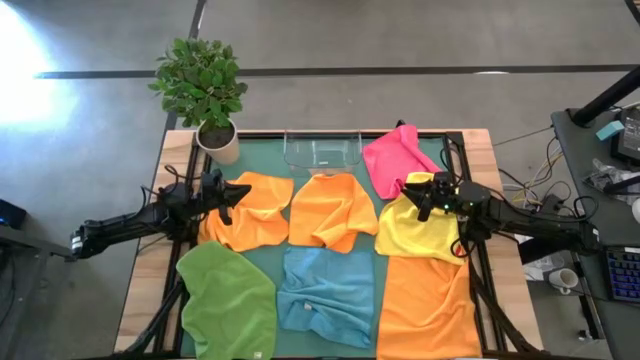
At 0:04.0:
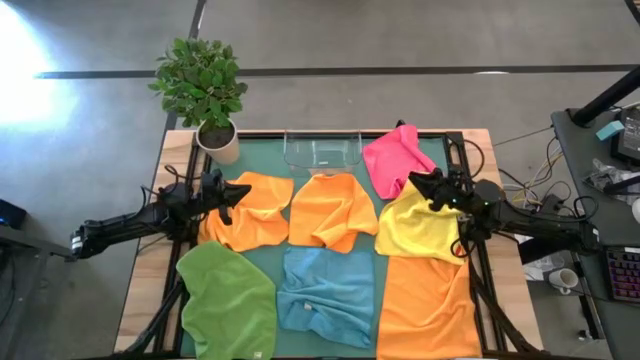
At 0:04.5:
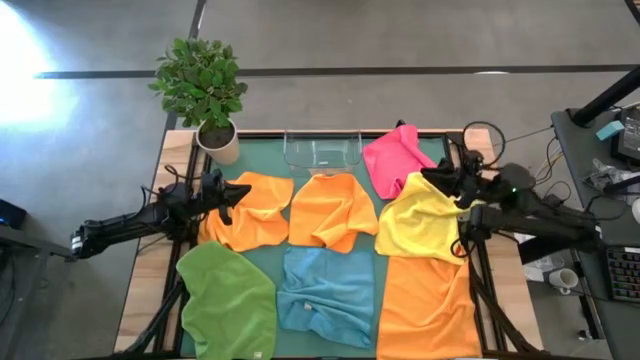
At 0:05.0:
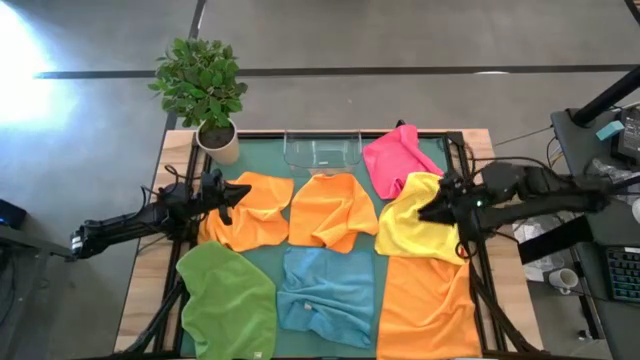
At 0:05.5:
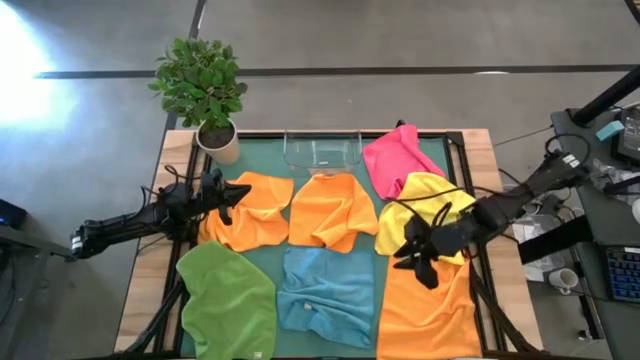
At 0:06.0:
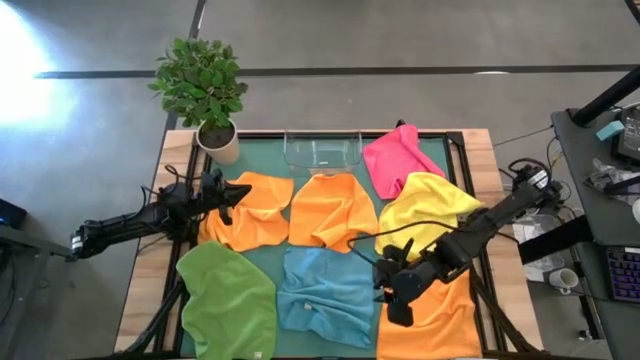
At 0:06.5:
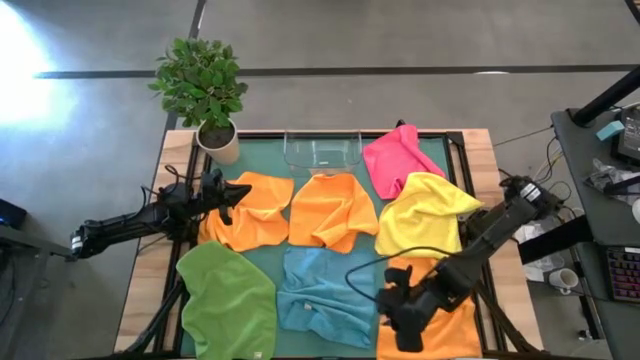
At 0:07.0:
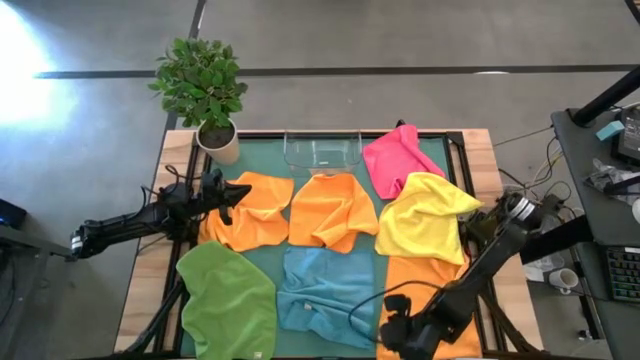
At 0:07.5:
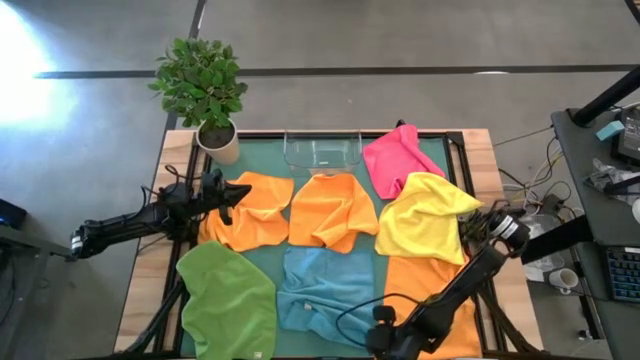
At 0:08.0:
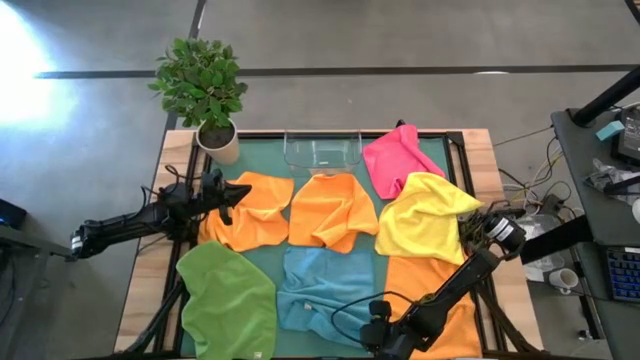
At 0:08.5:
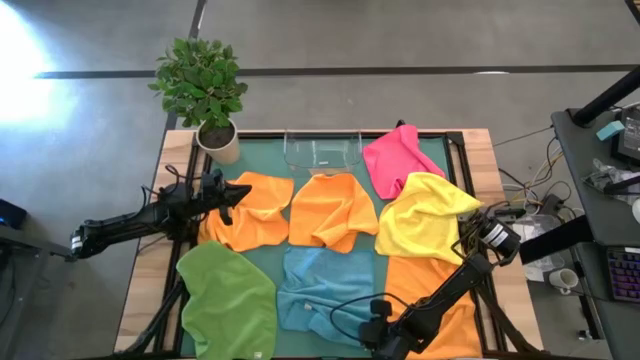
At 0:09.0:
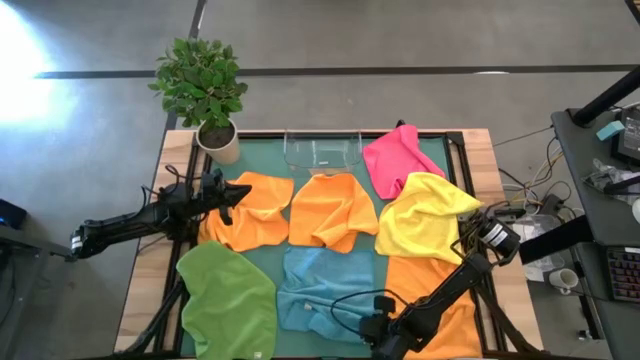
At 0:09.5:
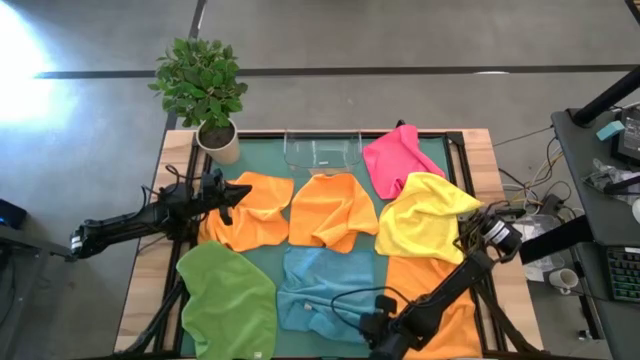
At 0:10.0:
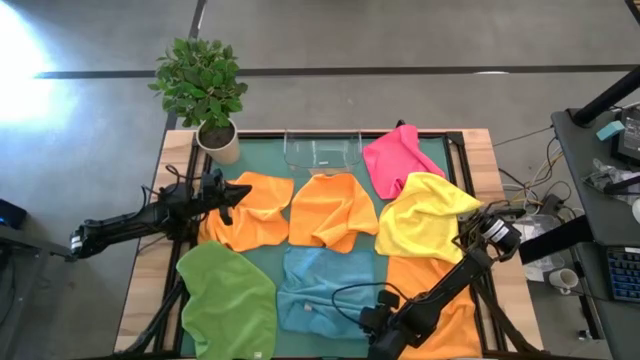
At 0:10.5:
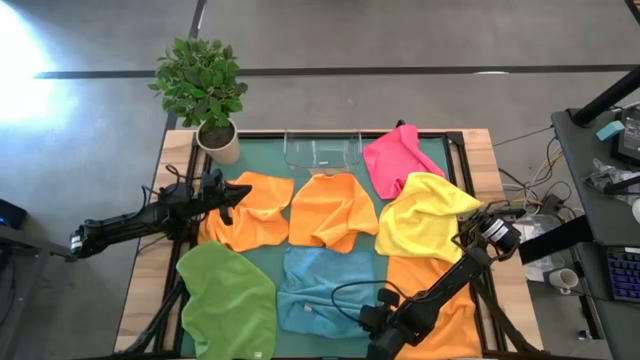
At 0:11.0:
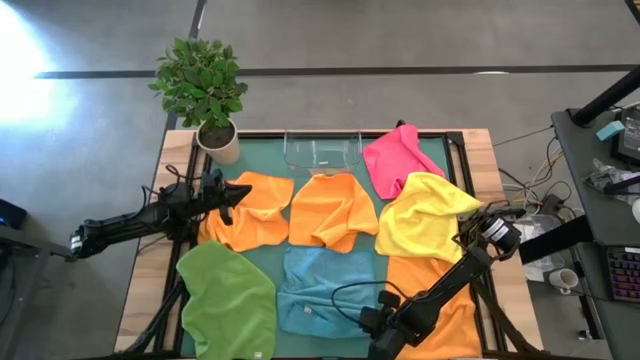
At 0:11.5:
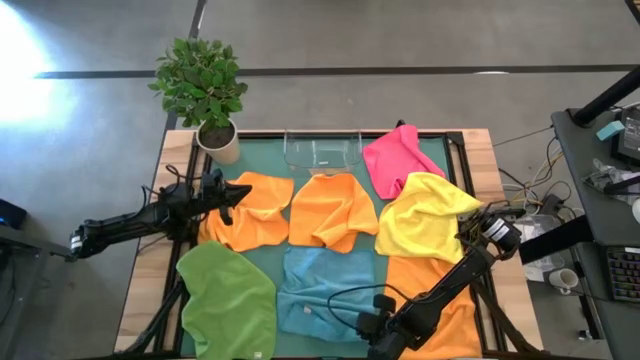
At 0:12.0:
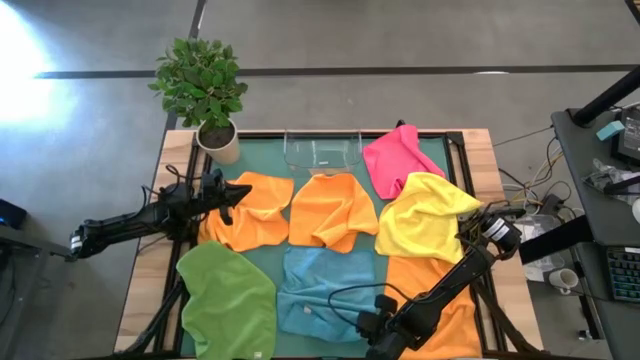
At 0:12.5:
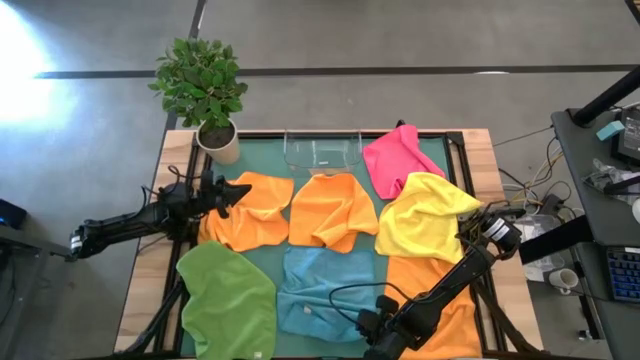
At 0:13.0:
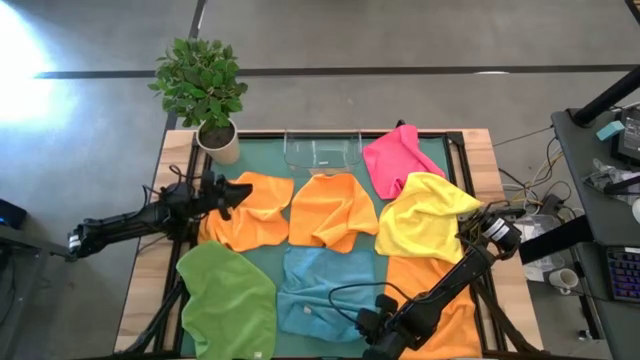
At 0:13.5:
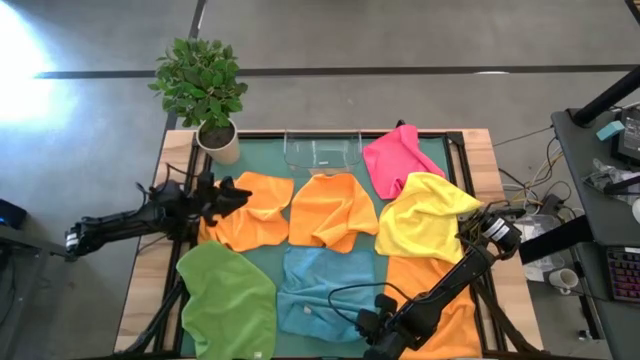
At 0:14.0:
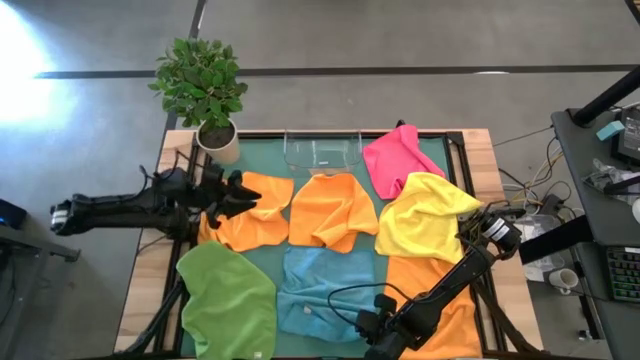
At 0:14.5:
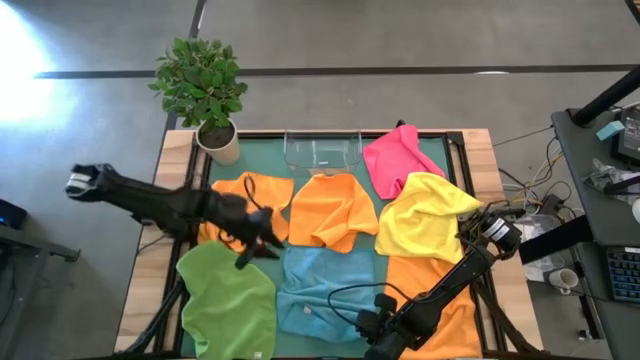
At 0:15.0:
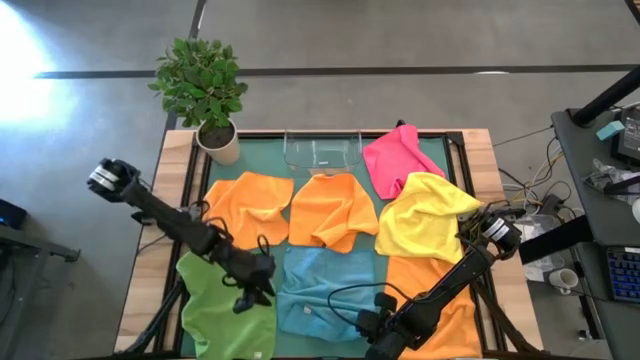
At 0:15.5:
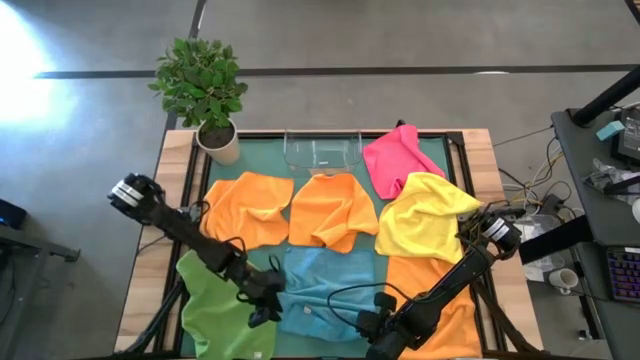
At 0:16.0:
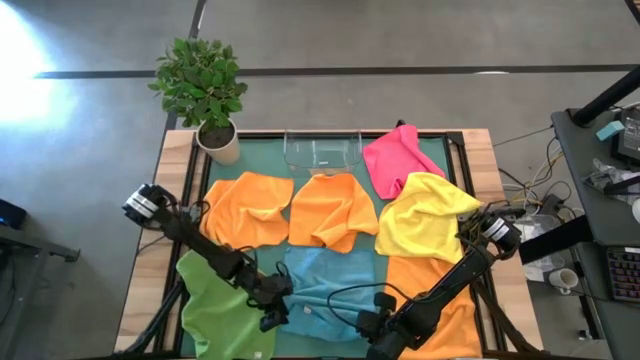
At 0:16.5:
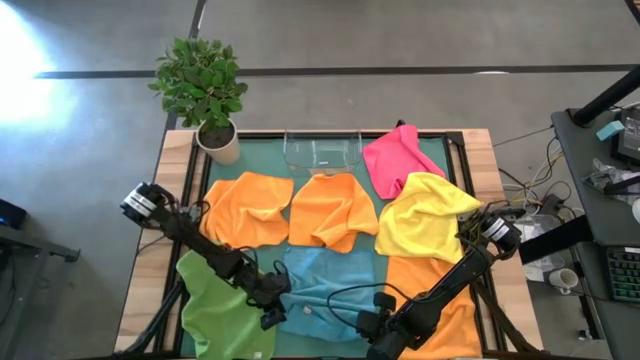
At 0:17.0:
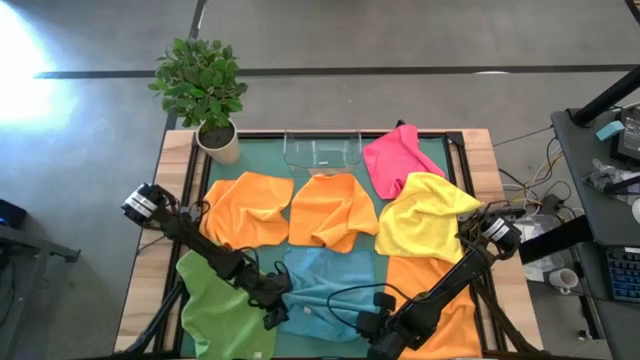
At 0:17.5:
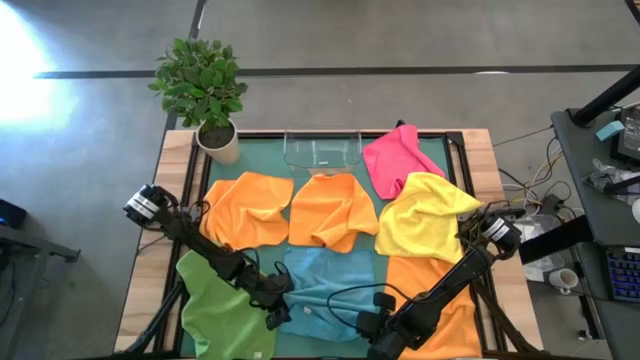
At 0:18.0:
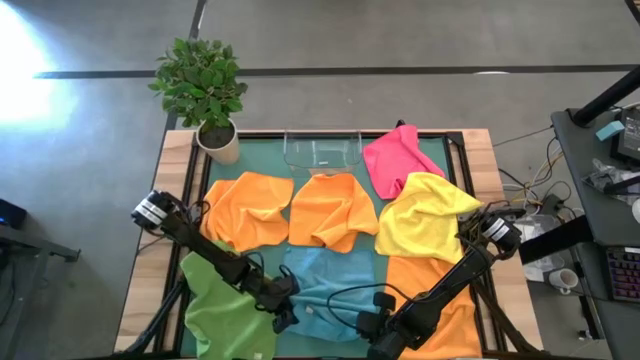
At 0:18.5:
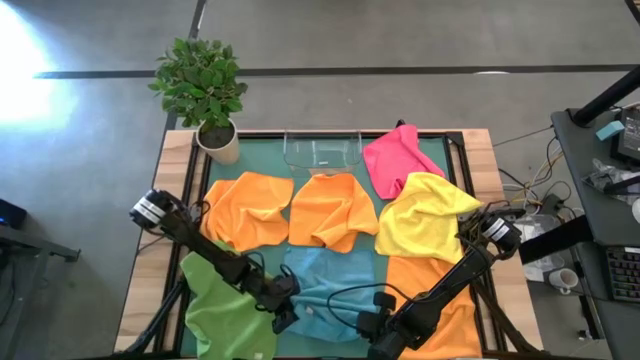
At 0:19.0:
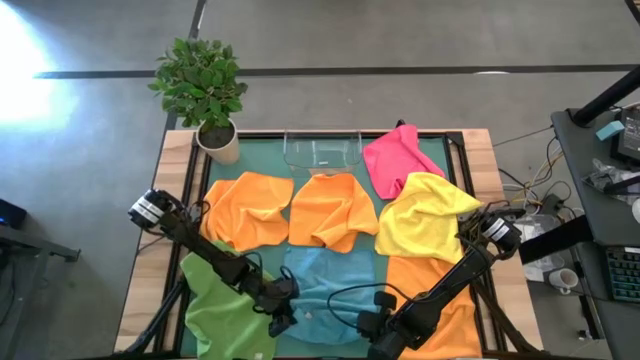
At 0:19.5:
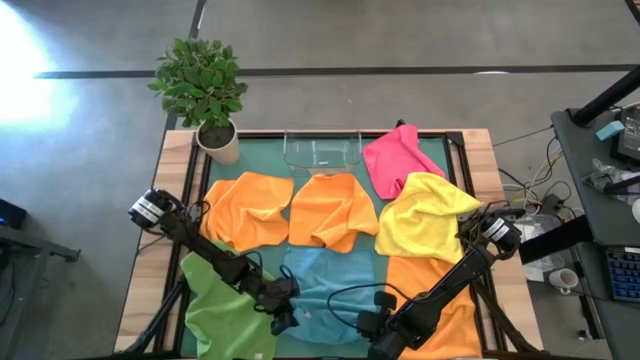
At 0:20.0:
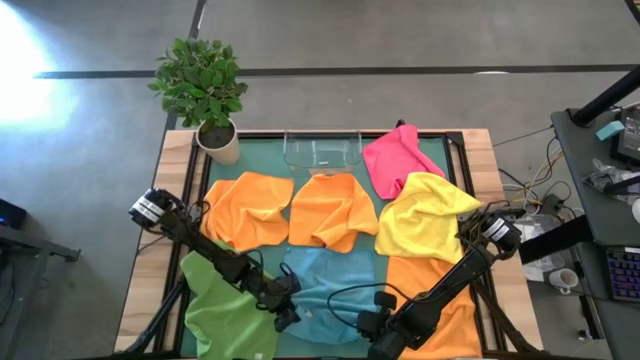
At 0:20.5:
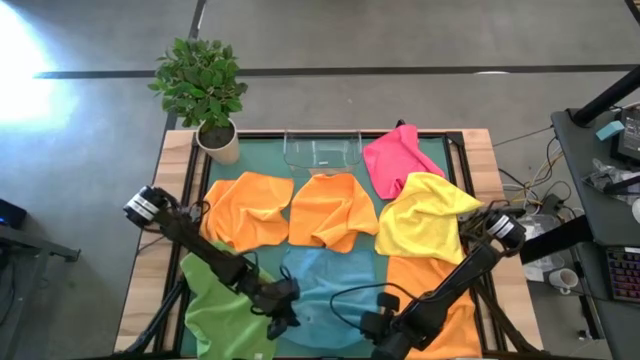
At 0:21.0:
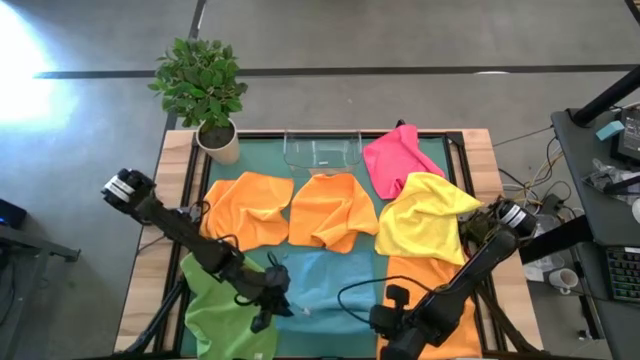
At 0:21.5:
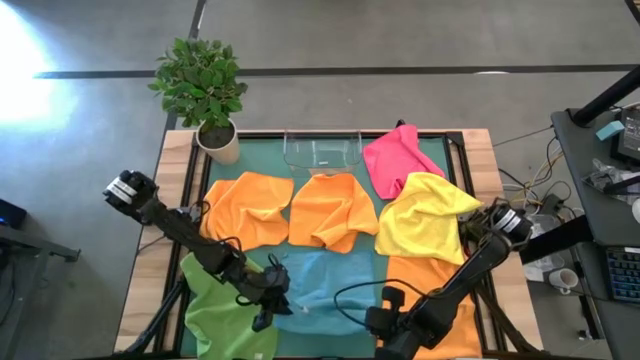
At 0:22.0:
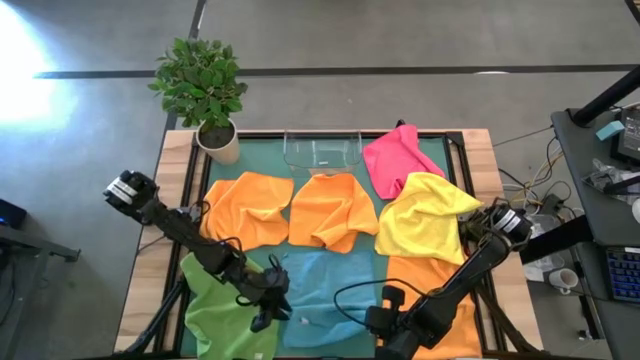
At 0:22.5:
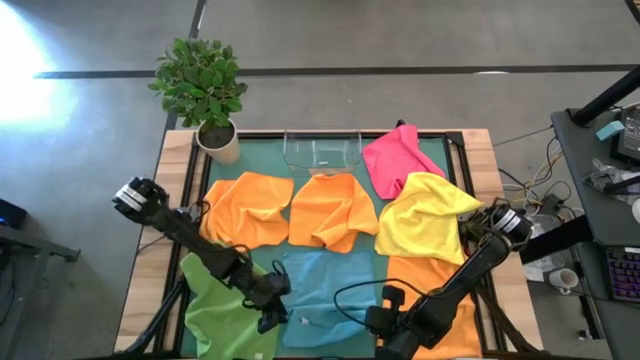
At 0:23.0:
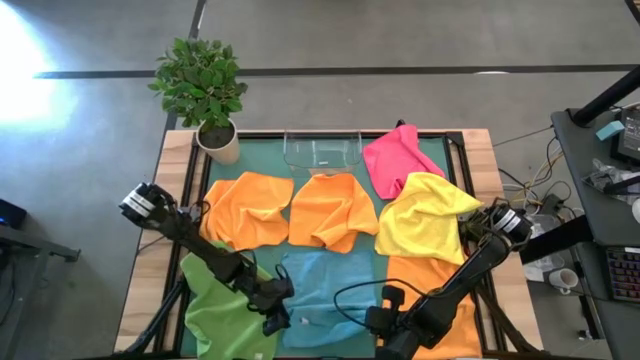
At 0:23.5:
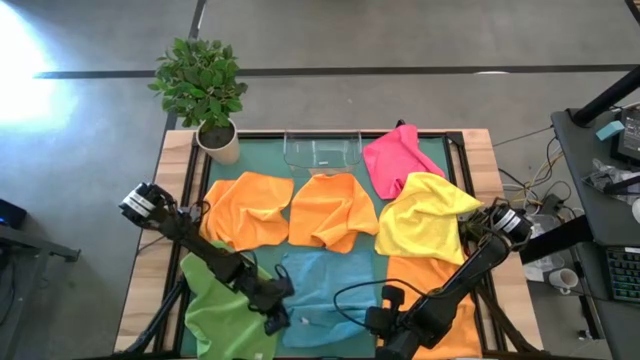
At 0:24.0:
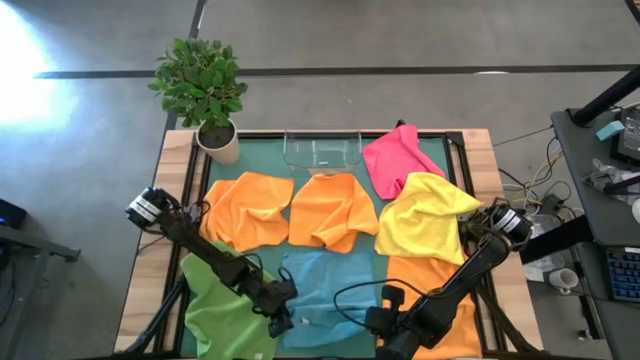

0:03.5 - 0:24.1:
Task: Fold microfiber towels
Fold the blue microfiber towel
